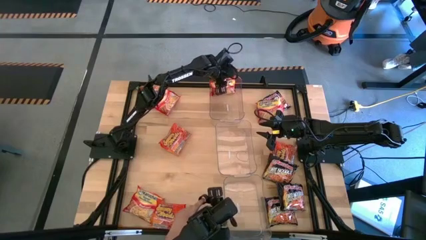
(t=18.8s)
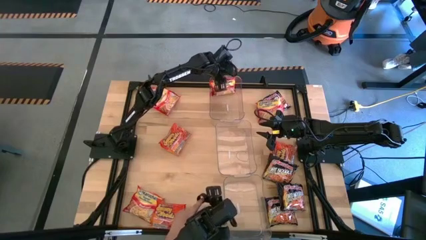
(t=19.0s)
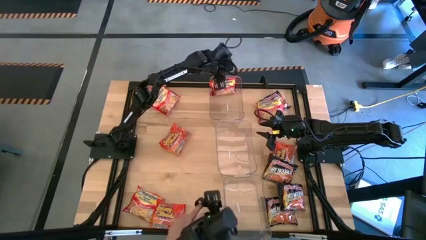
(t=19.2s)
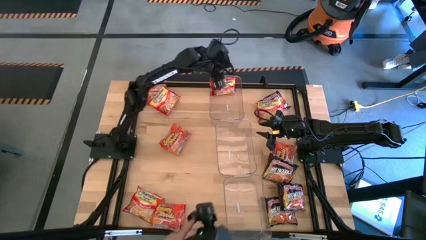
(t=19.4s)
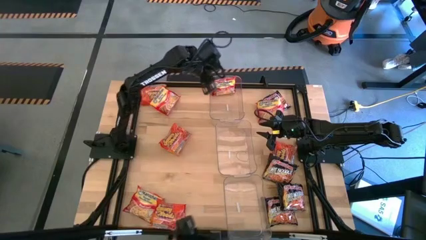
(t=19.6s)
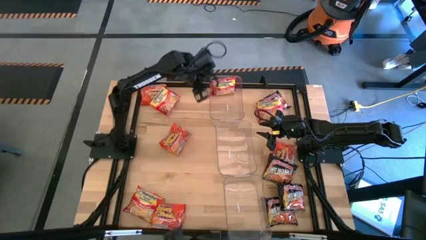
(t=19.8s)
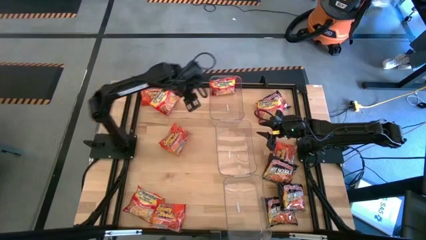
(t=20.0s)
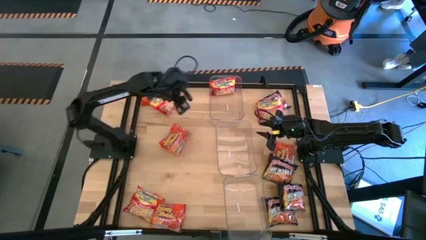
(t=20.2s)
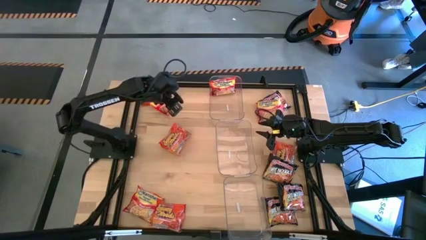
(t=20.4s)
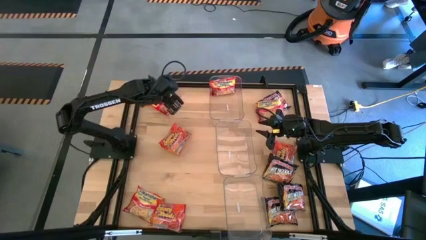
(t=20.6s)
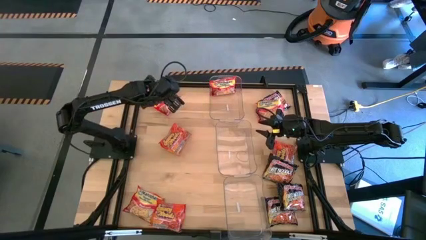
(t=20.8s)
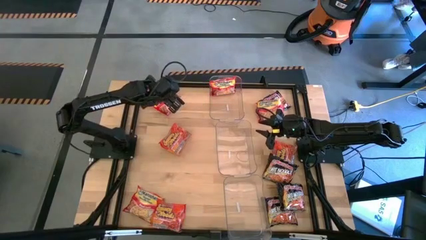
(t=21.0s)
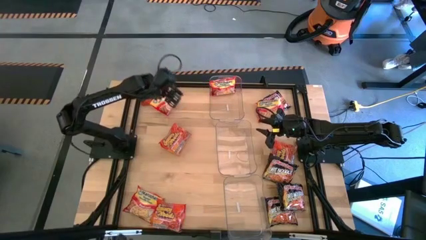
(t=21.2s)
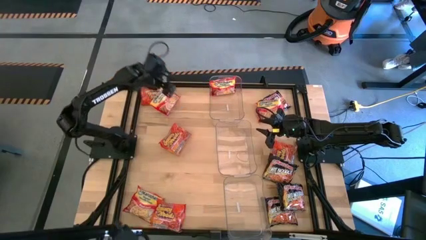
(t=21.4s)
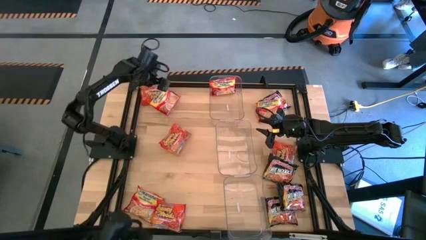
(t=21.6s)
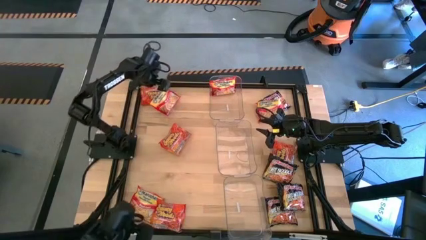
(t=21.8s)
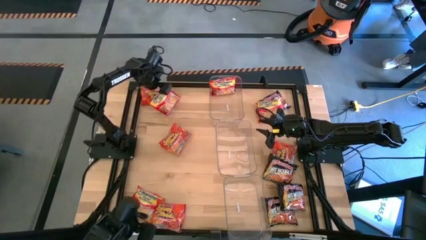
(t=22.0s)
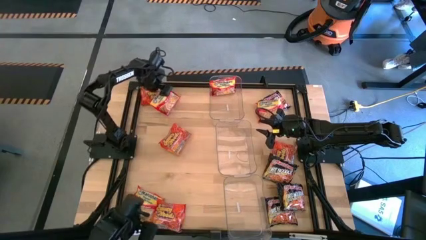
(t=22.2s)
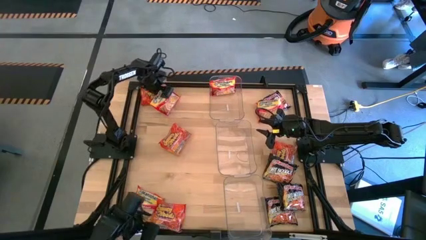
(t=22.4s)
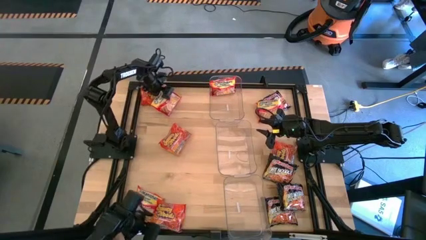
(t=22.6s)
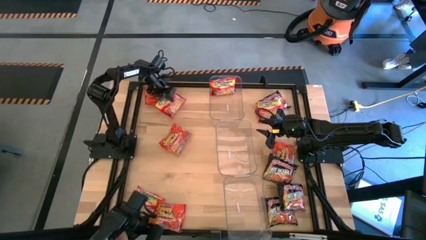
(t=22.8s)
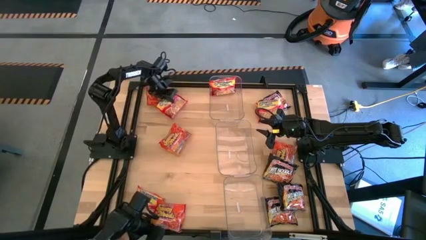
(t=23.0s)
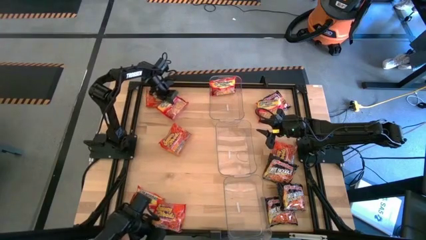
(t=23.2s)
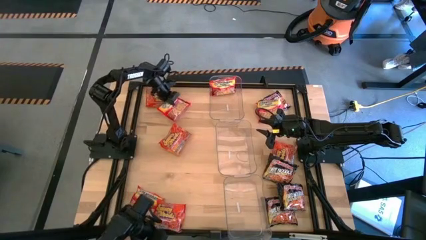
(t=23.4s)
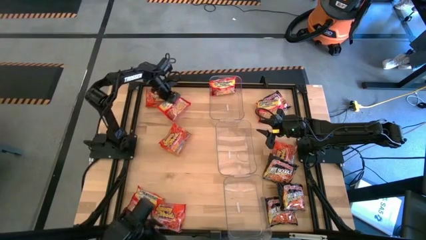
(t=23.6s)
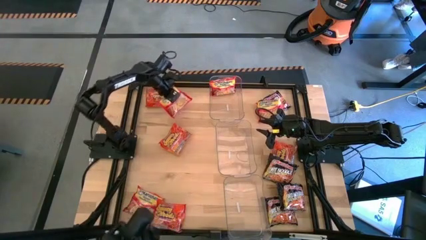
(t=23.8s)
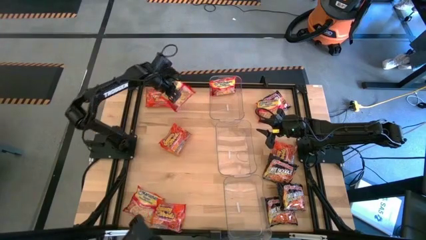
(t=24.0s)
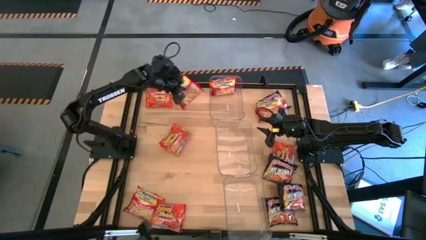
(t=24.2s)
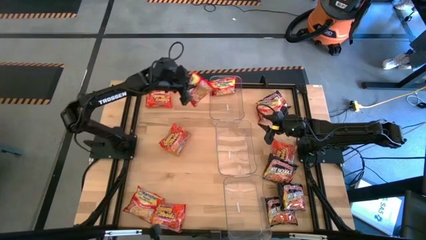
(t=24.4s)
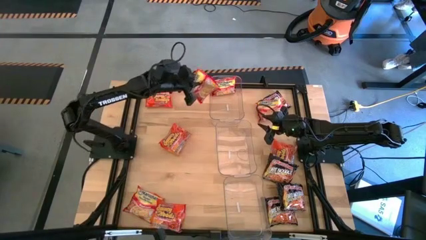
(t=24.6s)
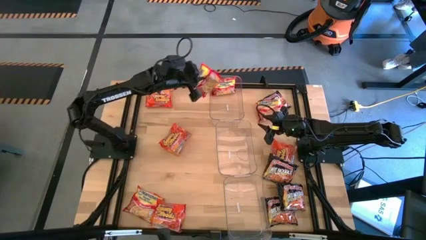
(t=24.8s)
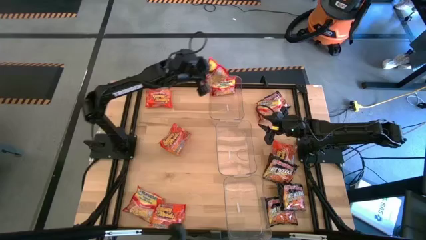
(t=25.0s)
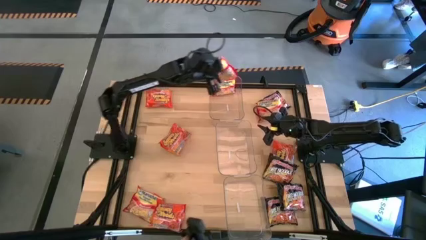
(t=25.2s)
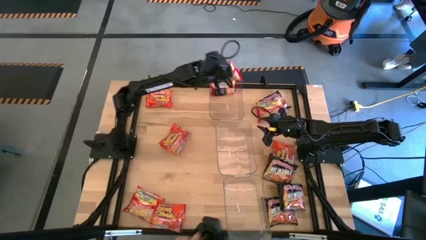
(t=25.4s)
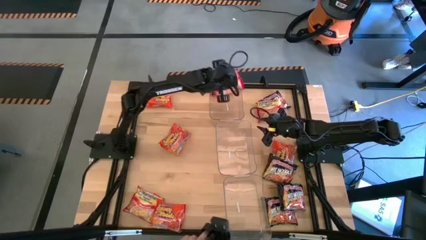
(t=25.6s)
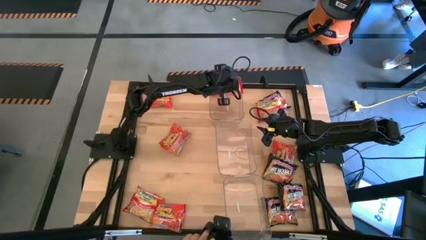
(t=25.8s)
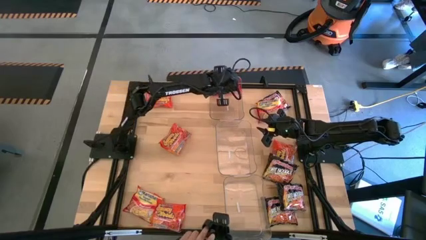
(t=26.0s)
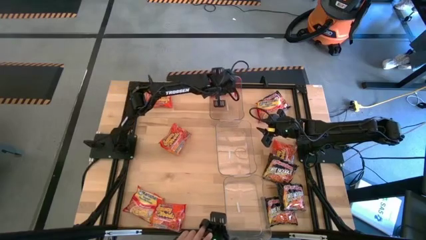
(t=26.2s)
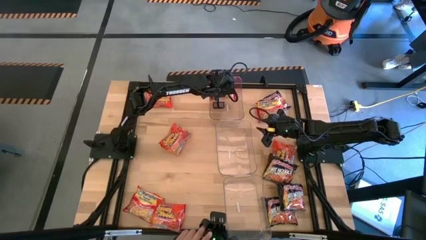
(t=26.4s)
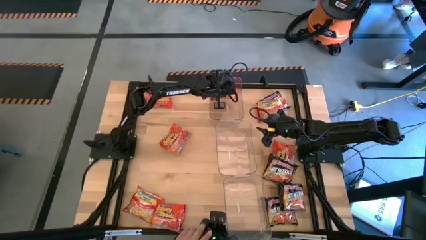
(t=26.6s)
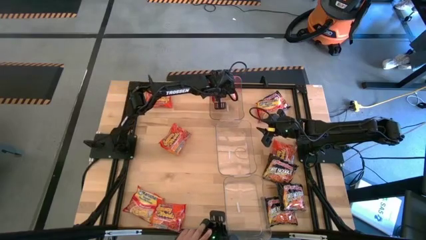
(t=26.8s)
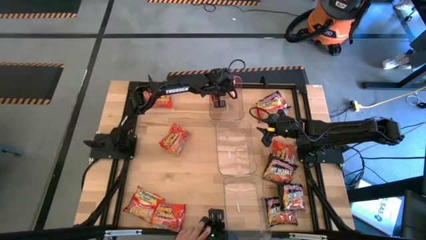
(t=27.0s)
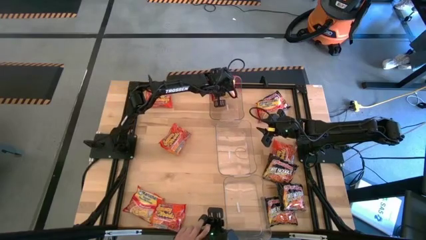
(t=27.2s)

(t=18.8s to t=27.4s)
Task: Sort Maruchan noodles
Put the red noodle pack into the top transparent bin

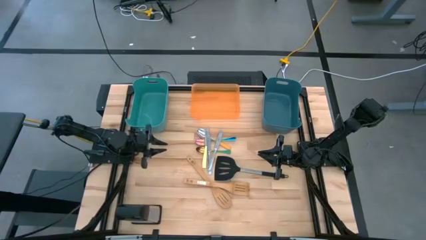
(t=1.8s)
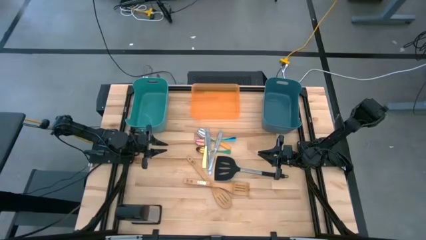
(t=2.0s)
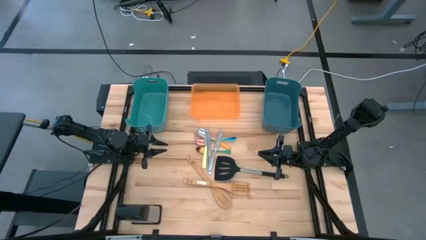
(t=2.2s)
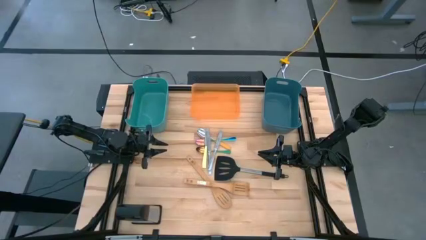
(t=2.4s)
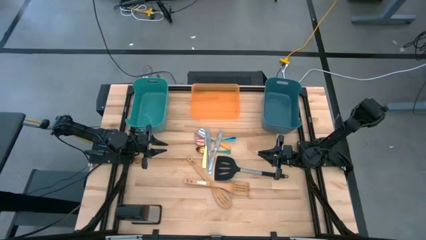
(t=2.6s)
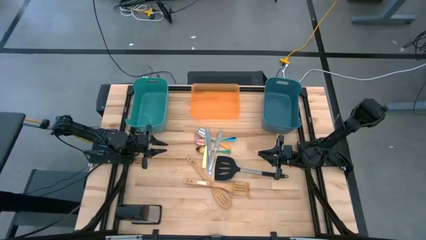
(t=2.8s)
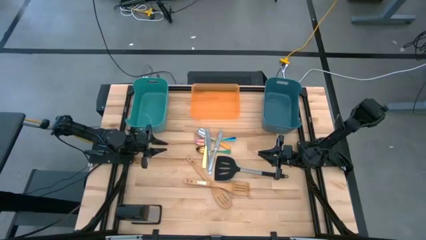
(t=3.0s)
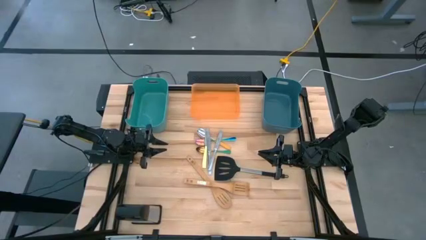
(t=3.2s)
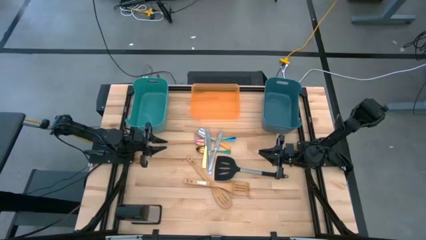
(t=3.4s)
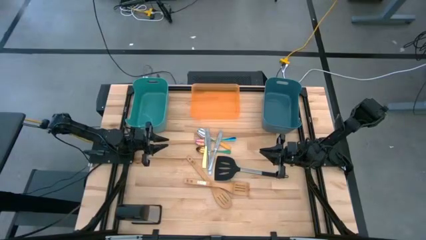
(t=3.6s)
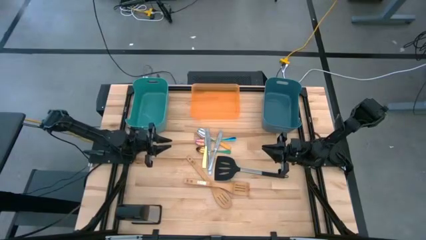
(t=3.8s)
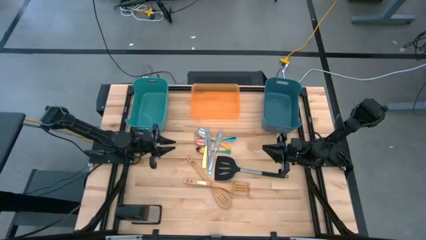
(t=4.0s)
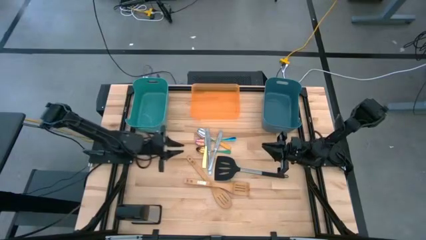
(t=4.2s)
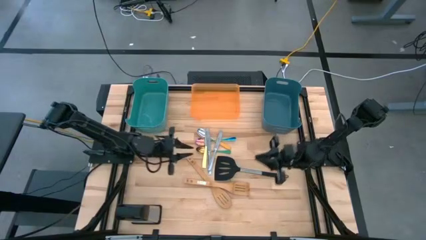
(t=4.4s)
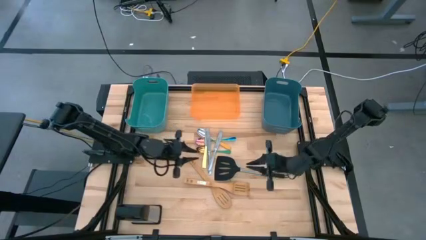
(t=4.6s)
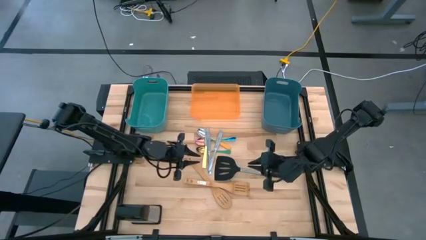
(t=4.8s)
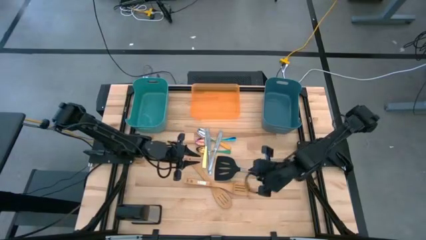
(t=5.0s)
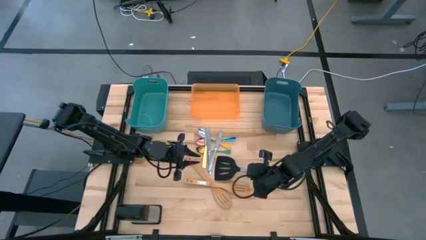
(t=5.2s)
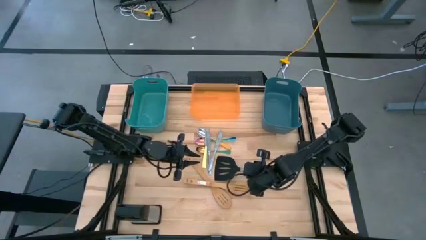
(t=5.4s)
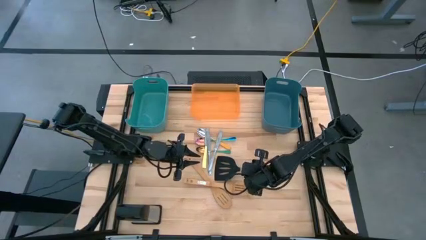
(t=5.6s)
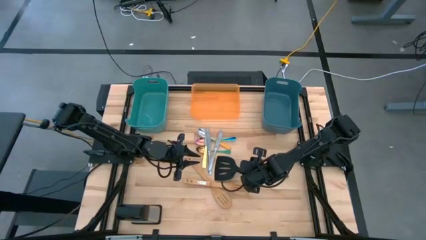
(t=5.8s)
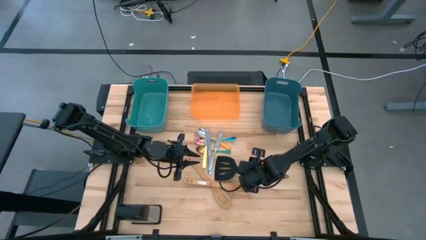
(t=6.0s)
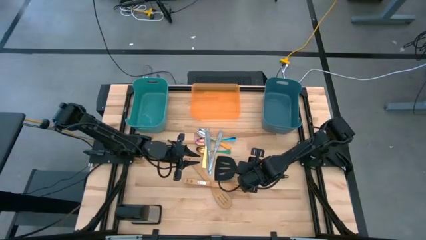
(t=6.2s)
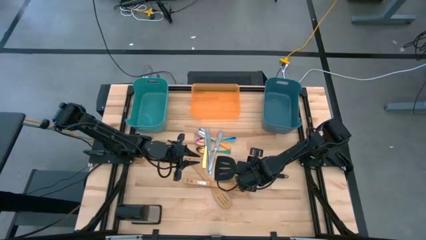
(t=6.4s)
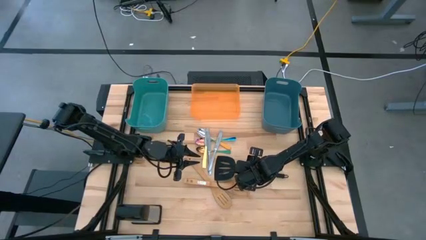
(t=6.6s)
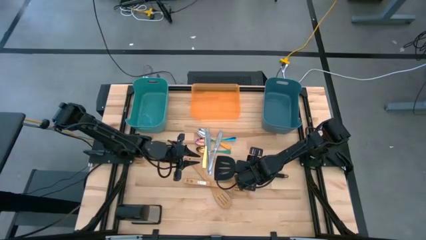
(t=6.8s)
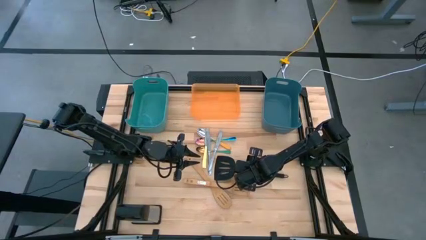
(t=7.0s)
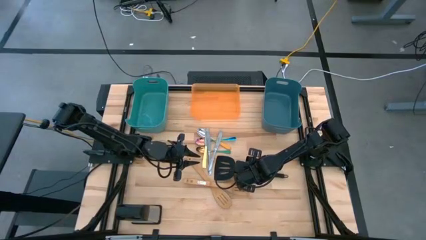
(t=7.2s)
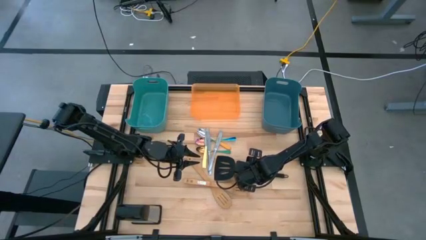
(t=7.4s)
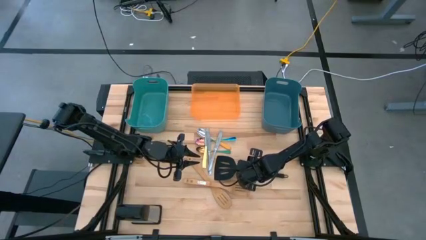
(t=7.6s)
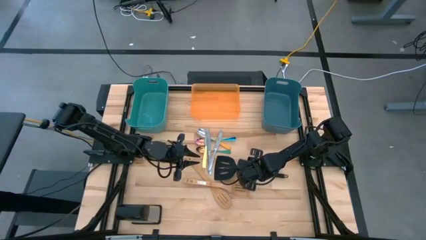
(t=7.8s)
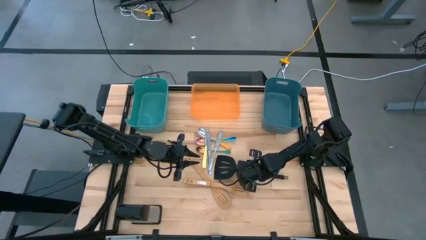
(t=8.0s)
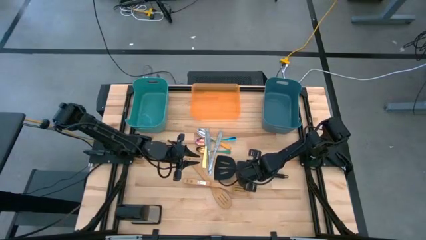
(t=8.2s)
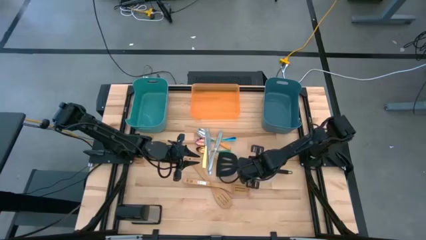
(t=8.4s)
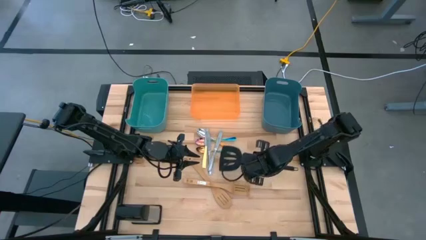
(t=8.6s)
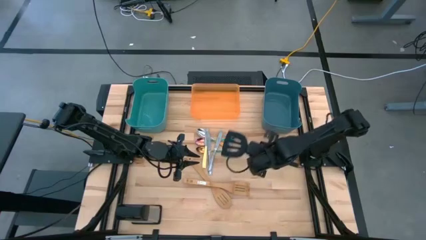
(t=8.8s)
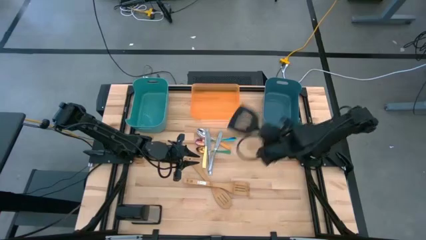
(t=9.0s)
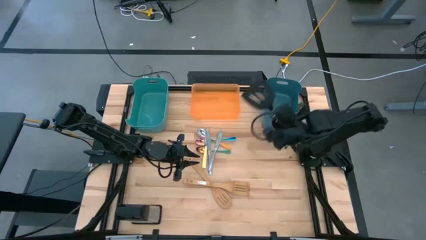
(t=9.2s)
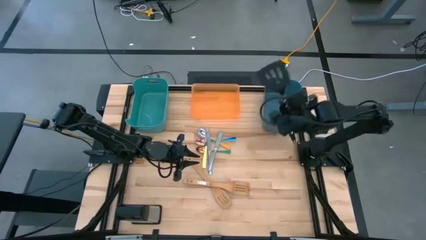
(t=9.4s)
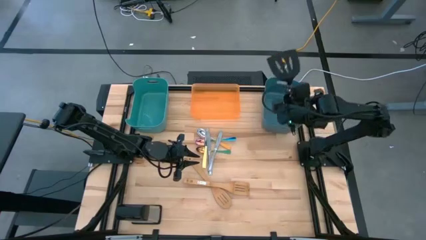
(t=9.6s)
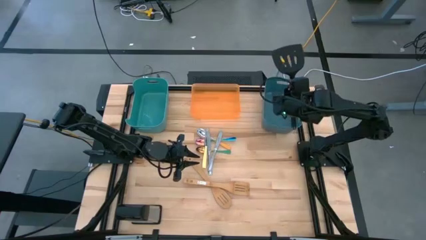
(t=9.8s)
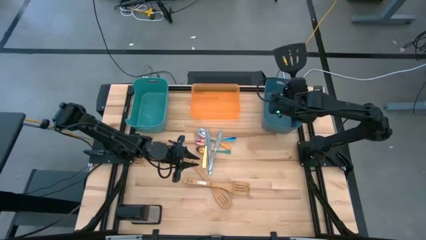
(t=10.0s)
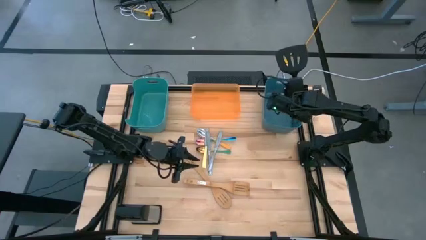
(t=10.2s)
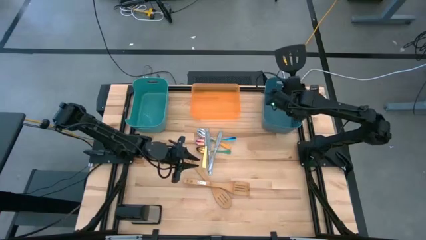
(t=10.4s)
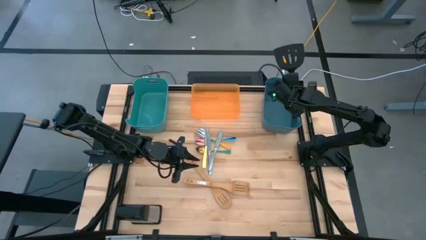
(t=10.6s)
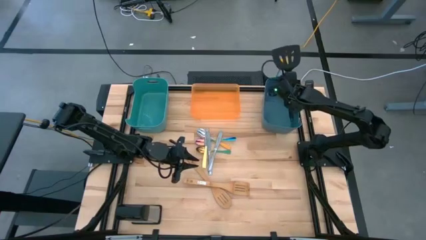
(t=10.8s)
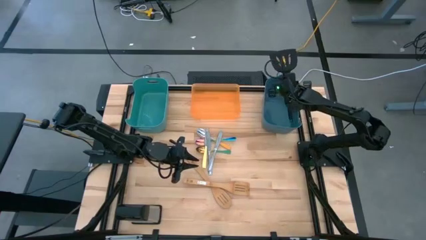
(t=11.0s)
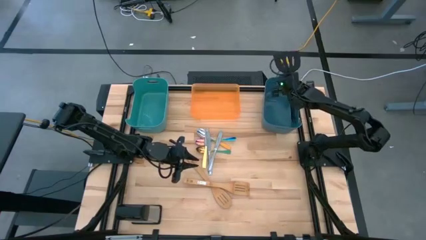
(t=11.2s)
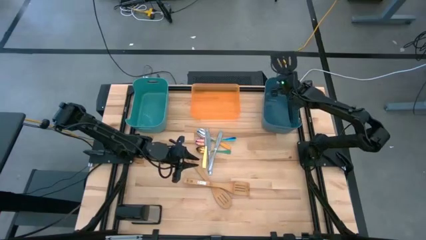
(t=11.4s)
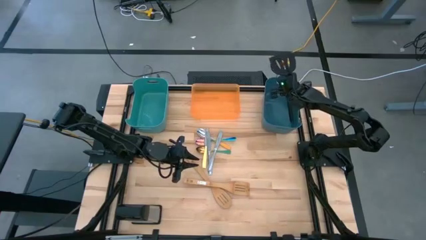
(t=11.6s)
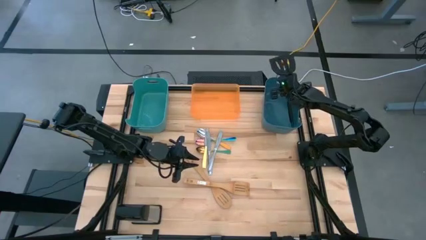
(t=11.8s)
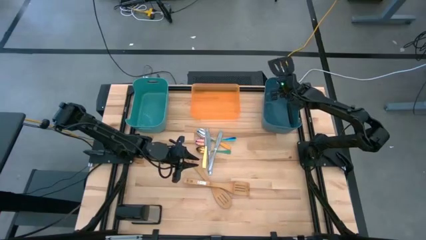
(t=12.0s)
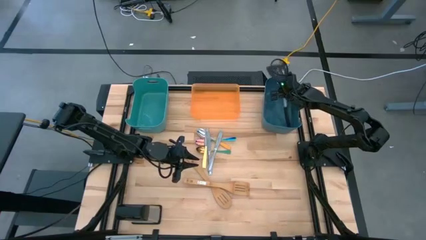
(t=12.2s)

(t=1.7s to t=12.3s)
Task: Pick & Place Kitchen Items
Put the black spatula into the blue bin
